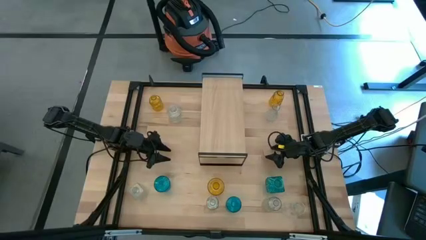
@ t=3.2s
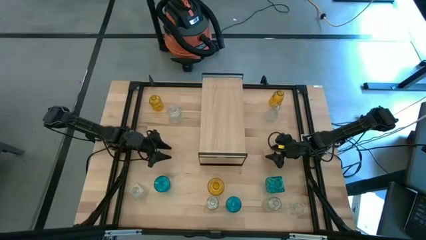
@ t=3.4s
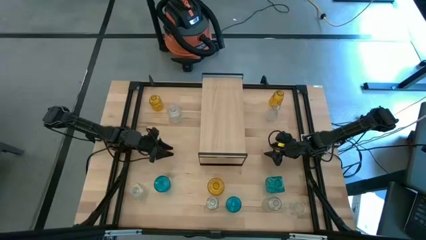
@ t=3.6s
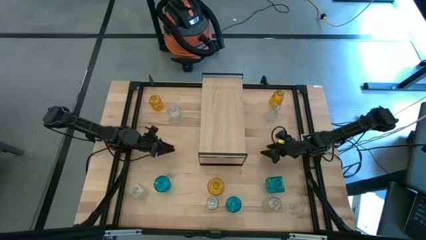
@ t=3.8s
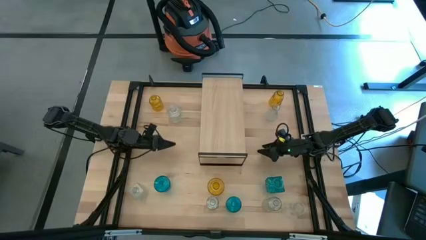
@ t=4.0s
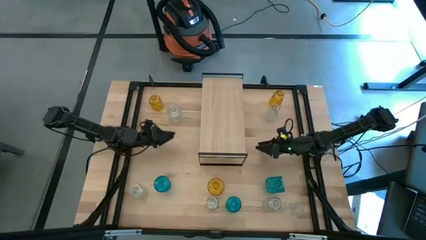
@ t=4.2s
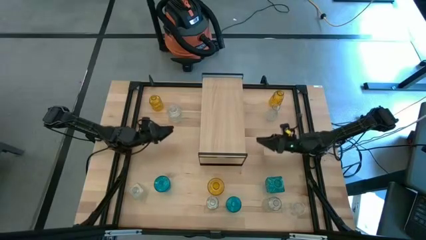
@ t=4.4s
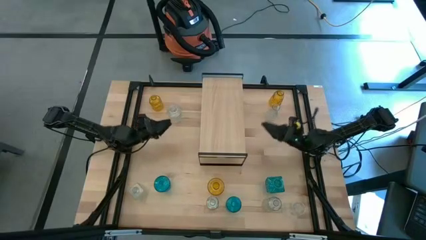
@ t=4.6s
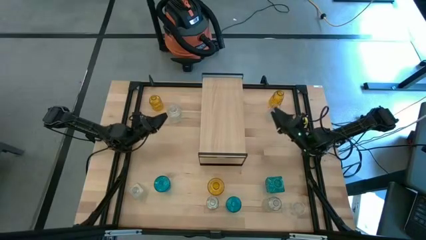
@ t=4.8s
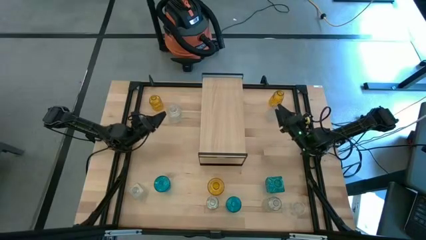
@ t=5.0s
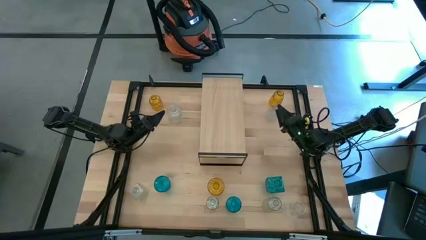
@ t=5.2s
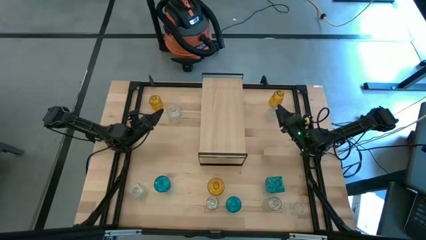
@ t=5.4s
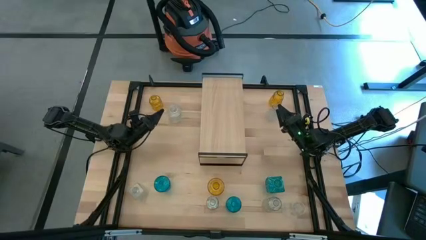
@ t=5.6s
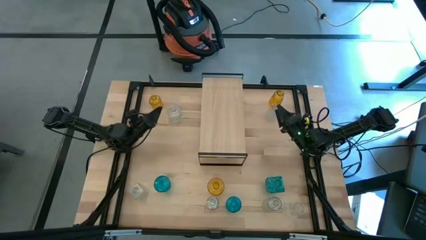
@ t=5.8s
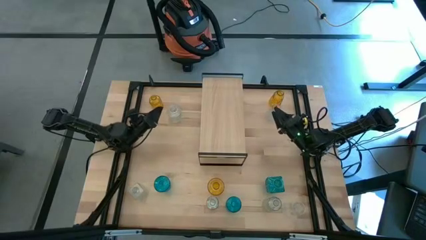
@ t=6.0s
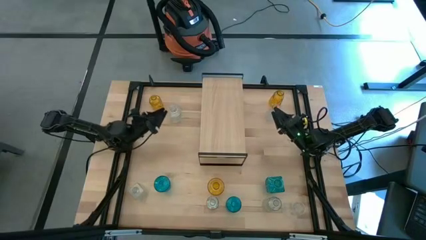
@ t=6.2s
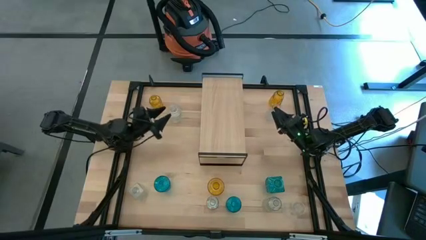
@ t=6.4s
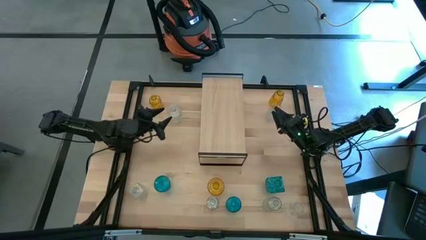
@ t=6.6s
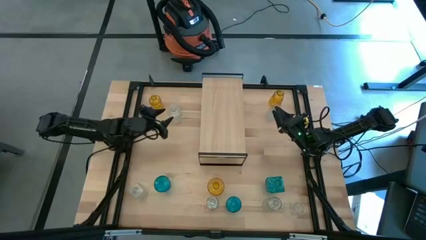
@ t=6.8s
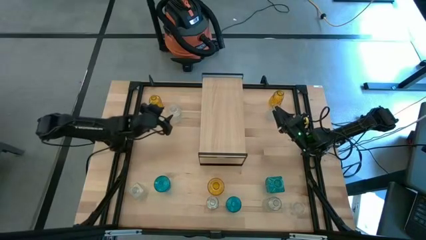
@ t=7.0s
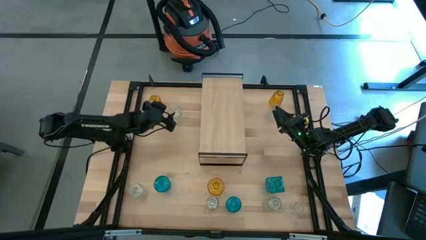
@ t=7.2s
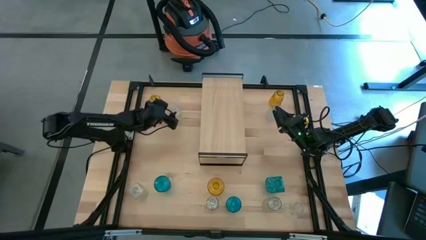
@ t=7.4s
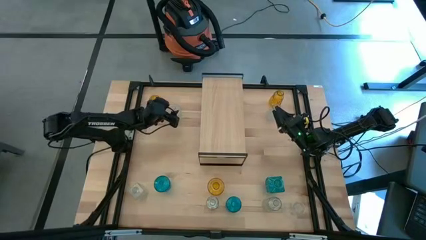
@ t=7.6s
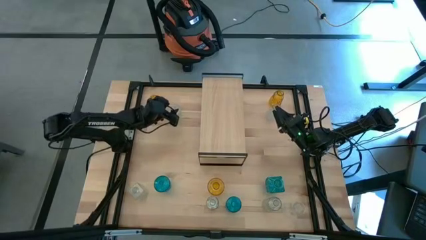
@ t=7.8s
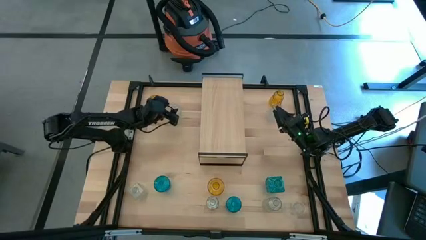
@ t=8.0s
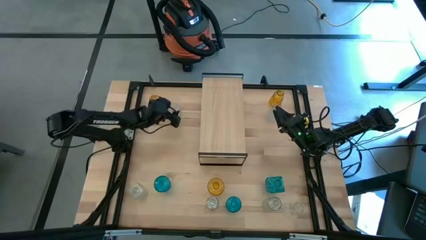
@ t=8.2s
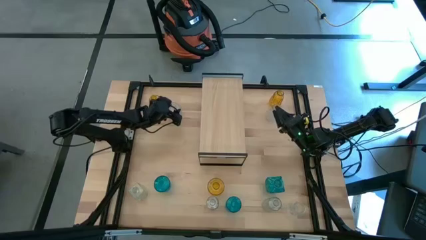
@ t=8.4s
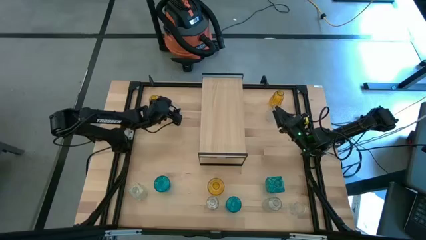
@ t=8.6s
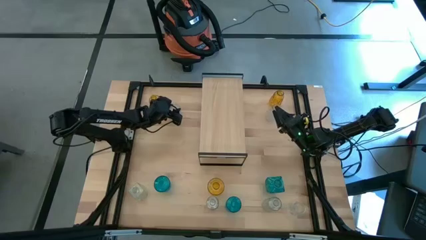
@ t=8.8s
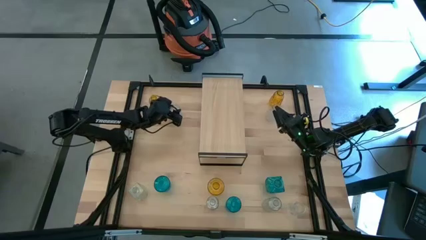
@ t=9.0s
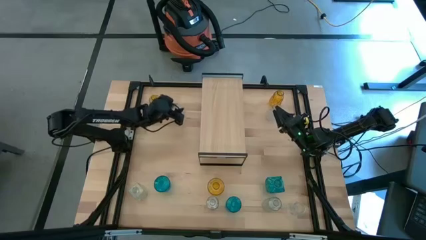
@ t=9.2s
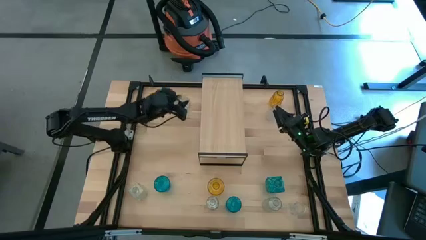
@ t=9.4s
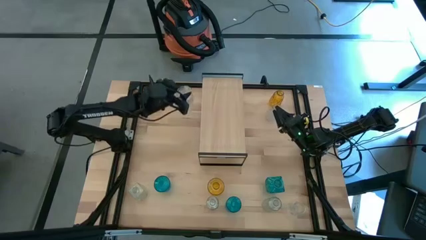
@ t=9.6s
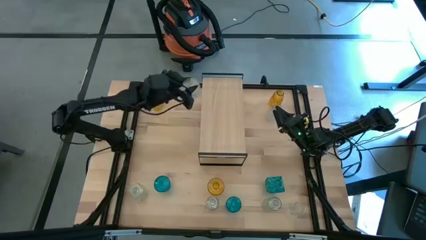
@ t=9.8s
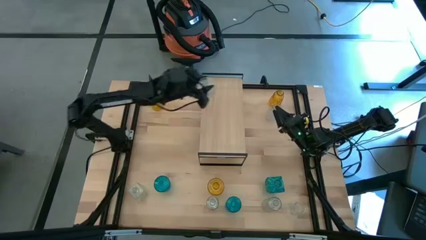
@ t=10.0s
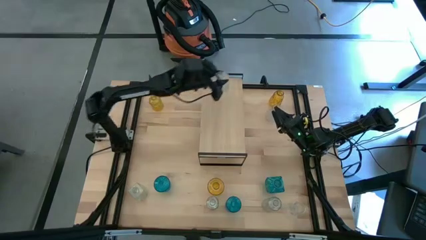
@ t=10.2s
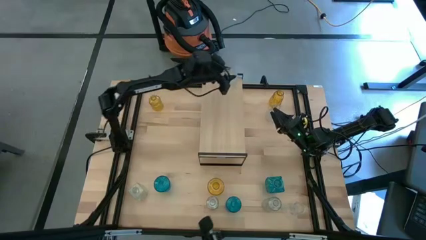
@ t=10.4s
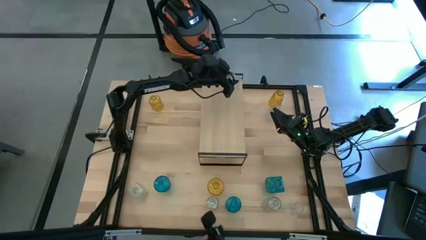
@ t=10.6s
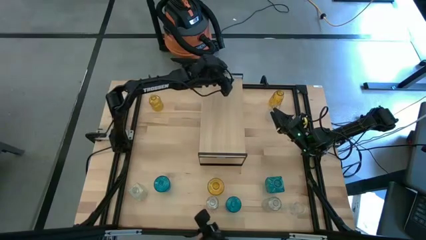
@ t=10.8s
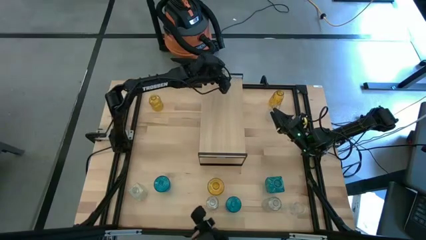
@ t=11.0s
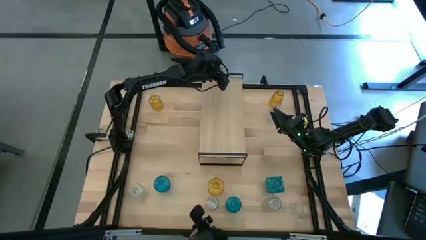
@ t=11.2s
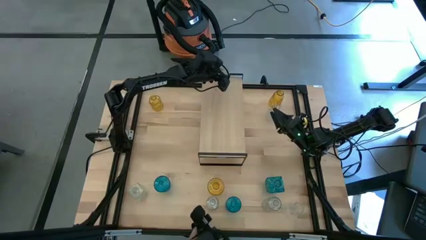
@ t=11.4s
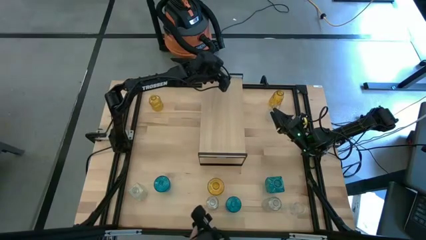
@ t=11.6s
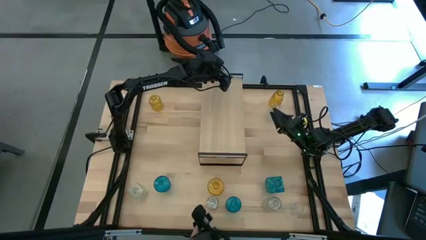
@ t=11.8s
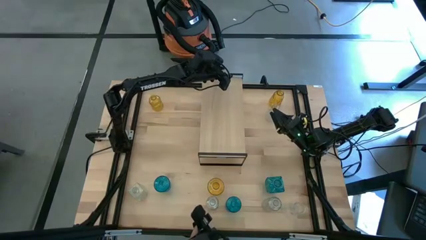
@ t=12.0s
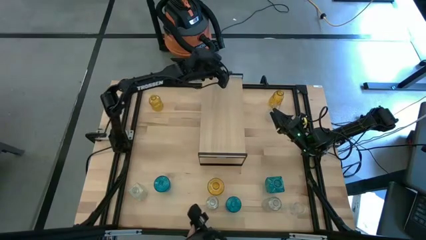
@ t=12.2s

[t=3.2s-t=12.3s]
Task: sort vases onto shelf
Put the transparent vase on the shelf

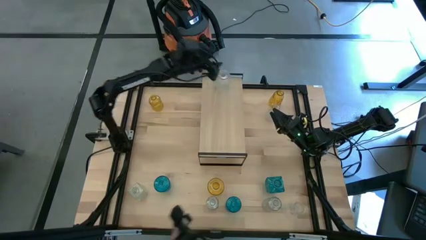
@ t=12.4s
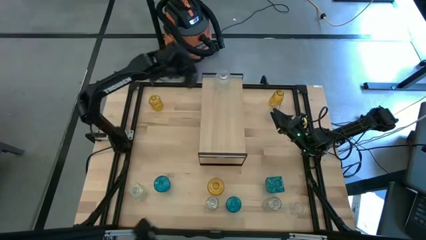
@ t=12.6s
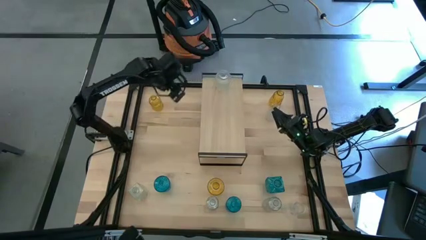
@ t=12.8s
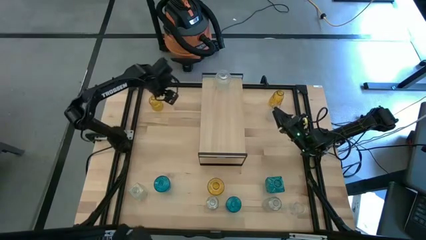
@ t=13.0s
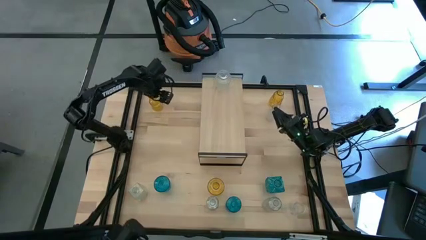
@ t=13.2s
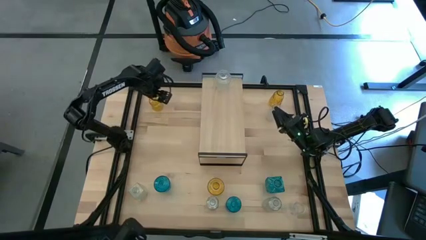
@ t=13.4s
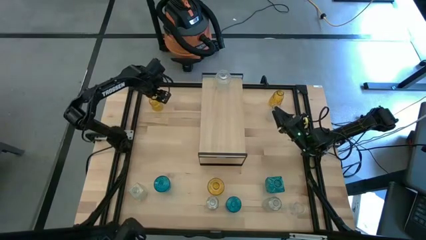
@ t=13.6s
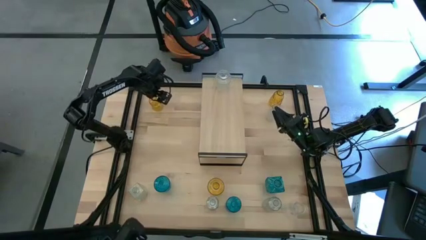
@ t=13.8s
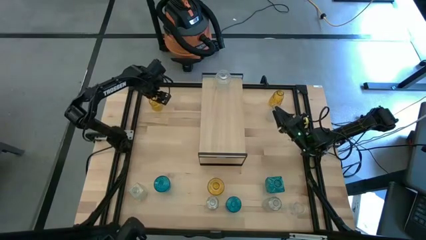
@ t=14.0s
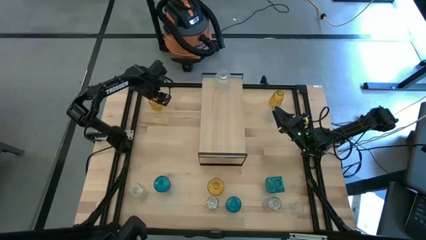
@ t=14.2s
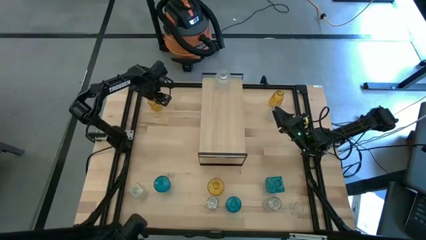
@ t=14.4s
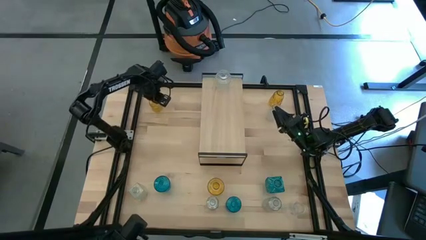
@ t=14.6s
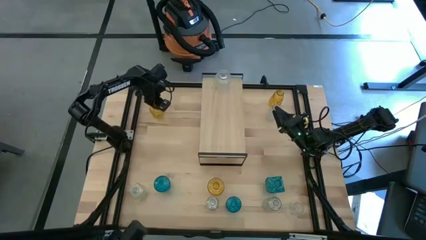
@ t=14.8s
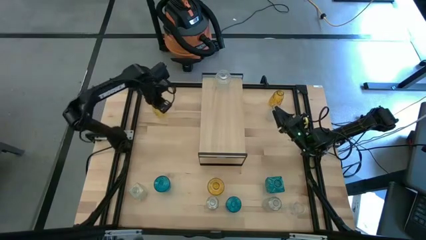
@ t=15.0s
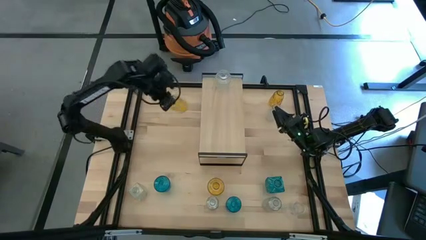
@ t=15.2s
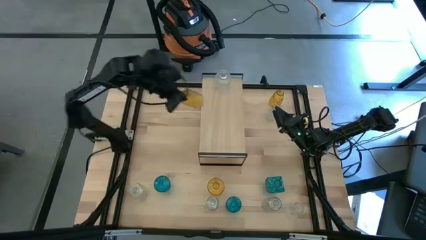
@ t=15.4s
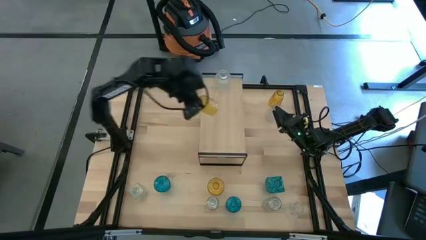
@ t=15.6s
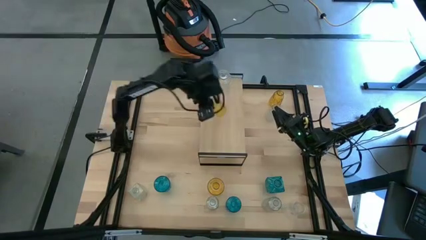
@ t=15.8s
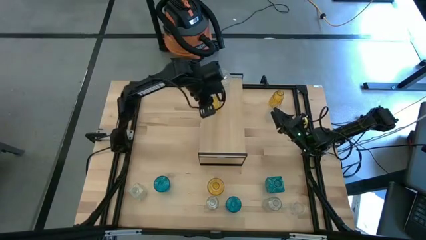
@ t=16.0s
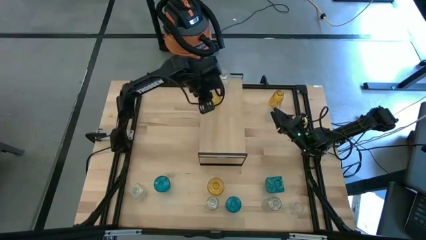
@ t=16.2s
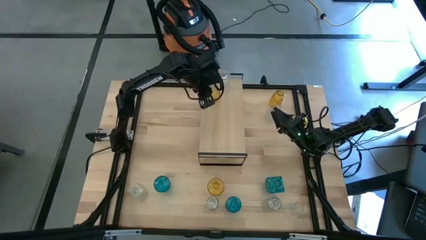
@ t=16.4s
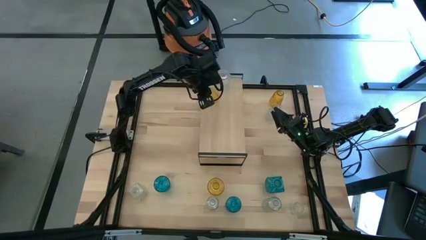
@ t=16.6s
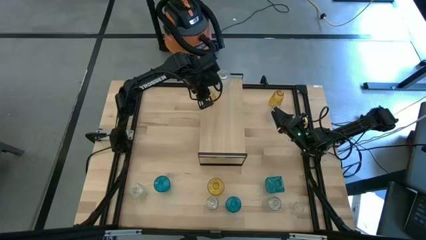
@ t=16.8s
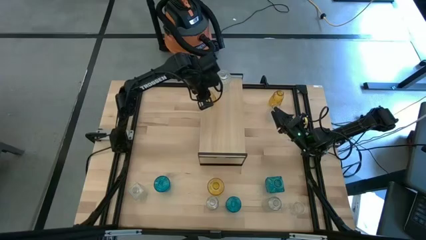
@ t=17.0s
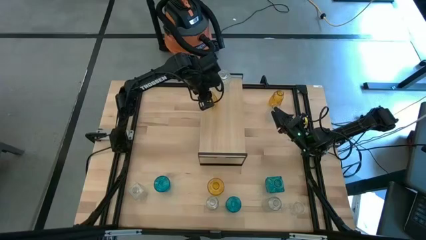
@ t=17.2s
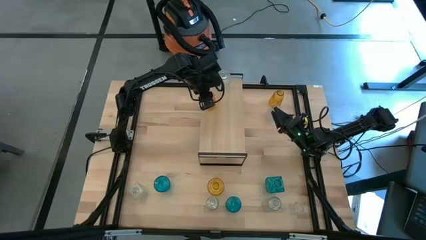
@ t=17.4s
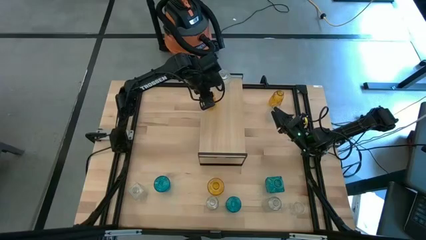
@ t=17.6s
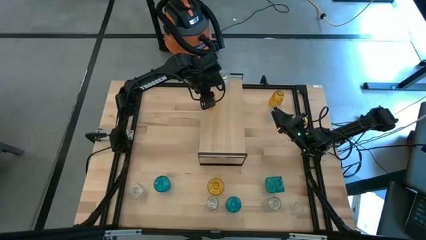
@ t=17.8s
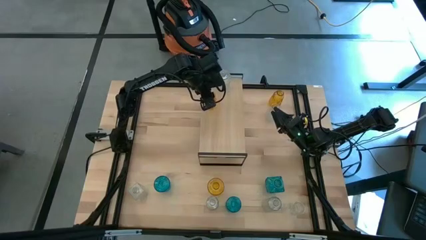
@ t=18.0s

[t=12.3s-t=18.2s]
Put the yellow vase on the shelf
